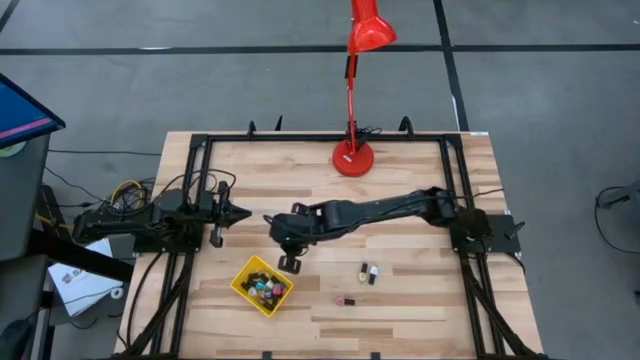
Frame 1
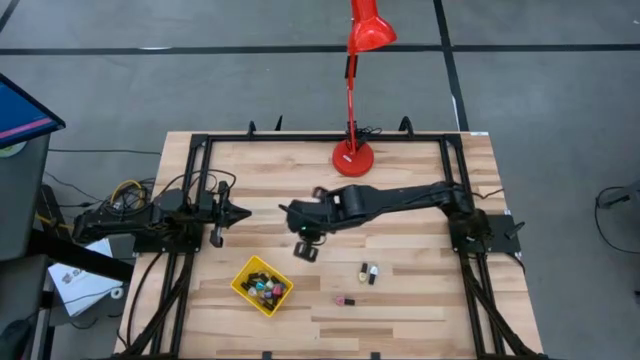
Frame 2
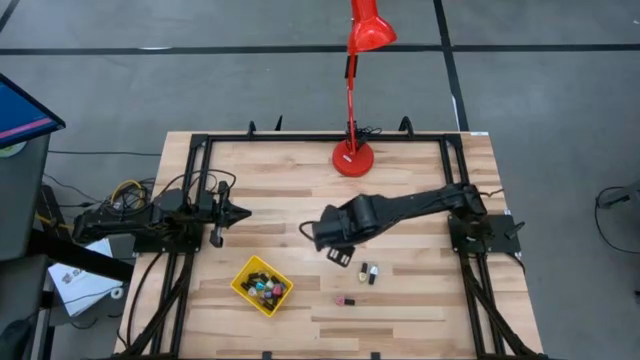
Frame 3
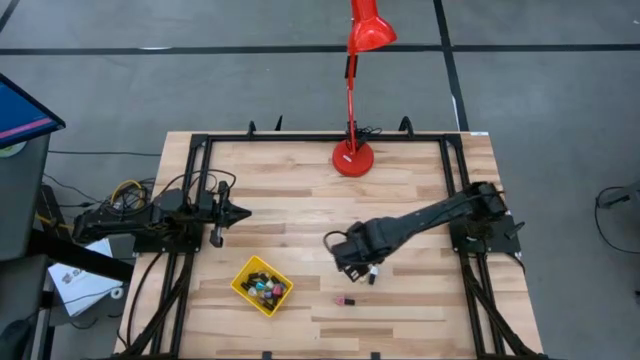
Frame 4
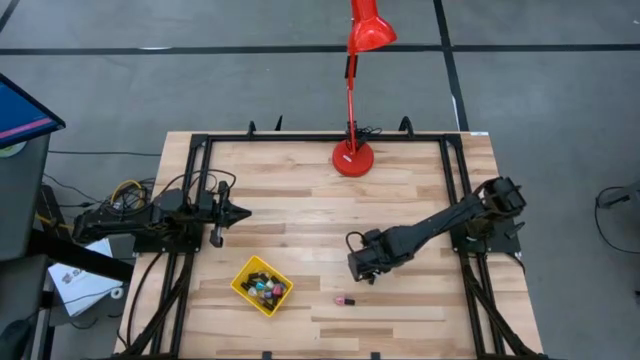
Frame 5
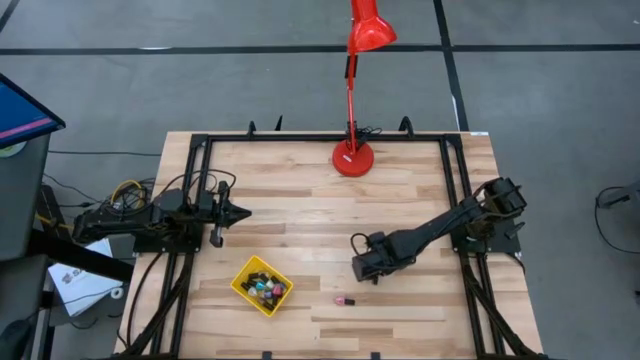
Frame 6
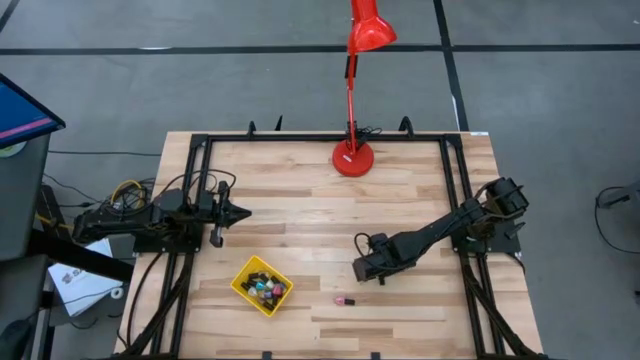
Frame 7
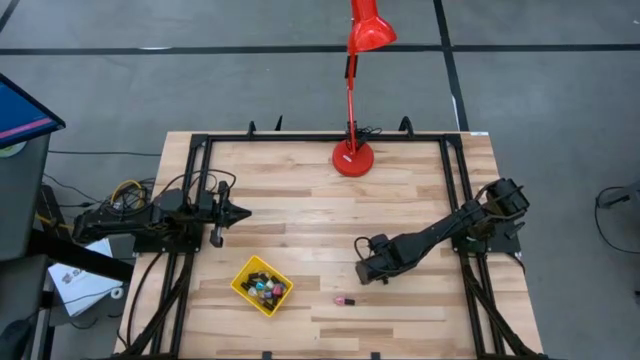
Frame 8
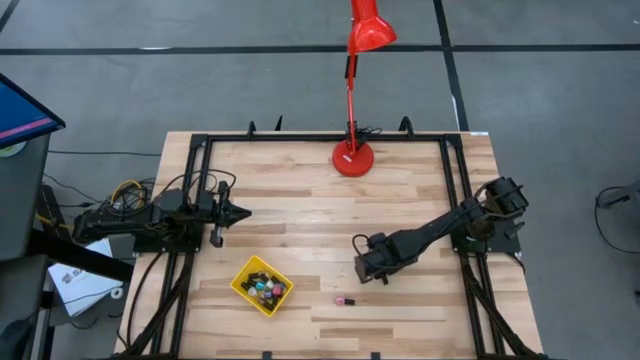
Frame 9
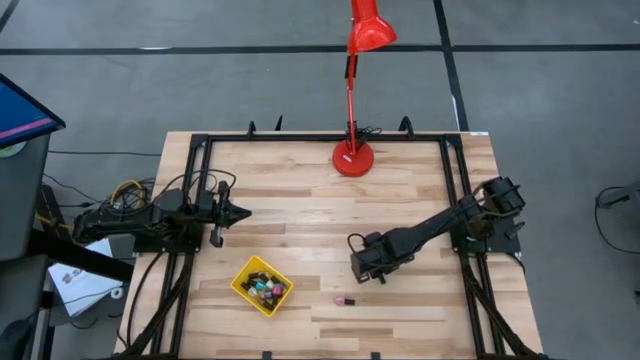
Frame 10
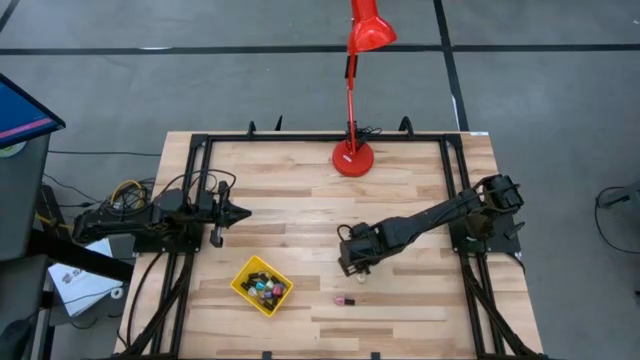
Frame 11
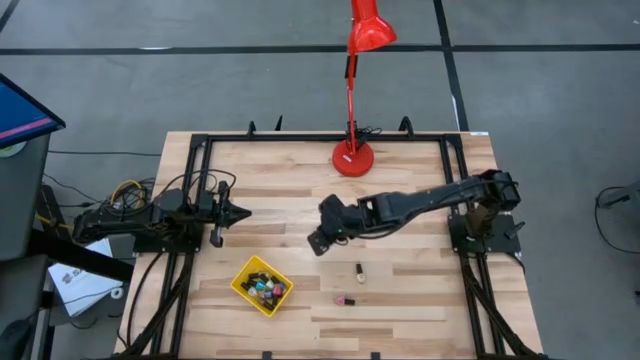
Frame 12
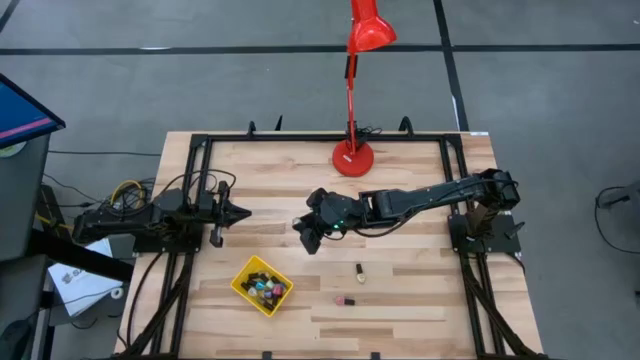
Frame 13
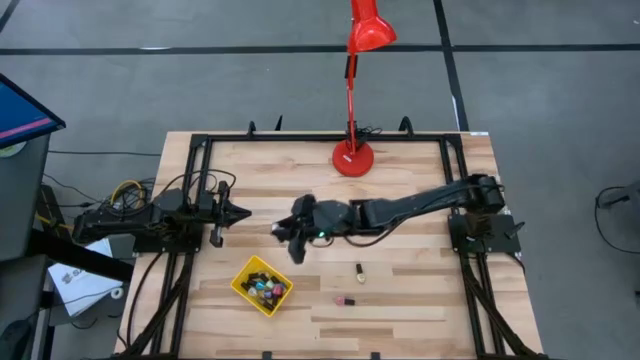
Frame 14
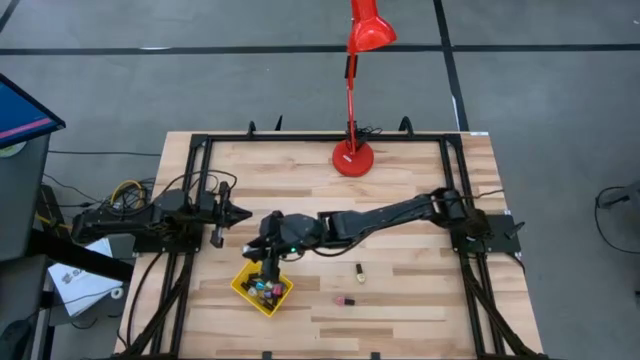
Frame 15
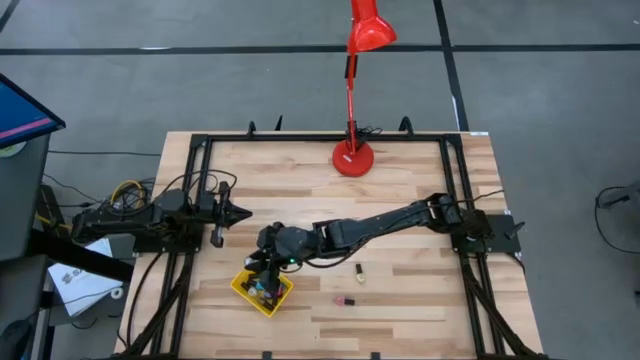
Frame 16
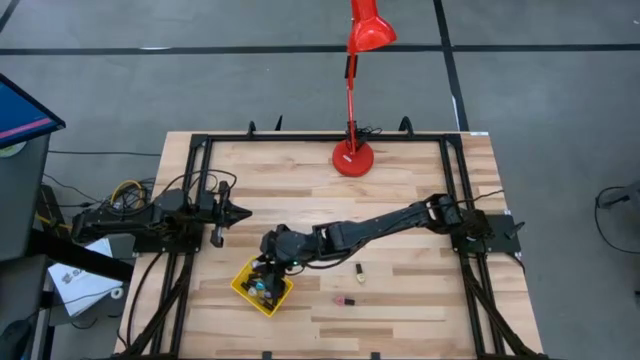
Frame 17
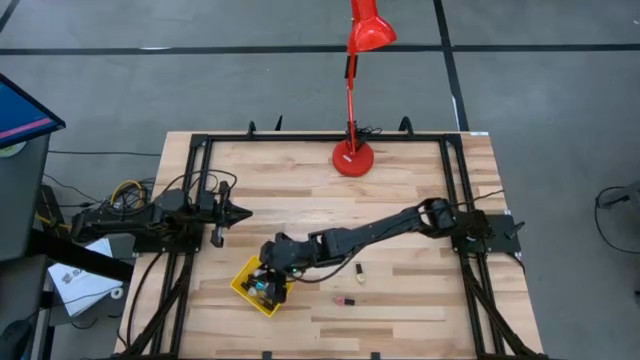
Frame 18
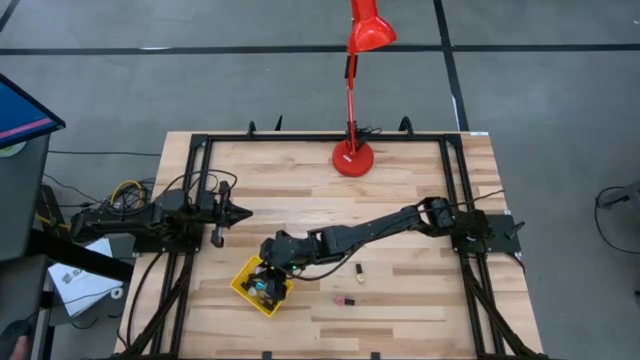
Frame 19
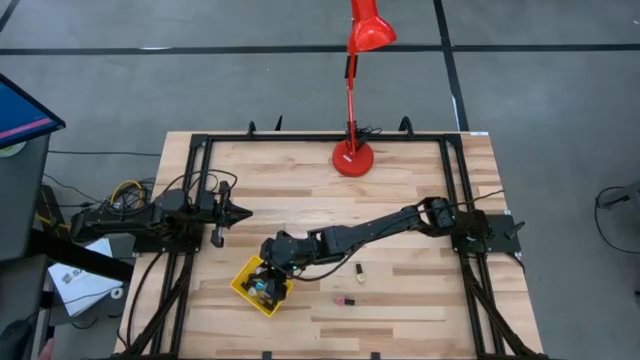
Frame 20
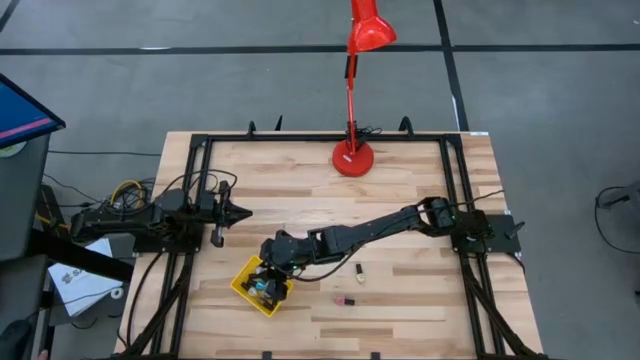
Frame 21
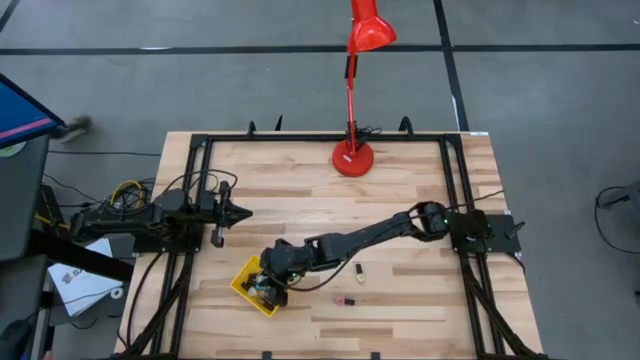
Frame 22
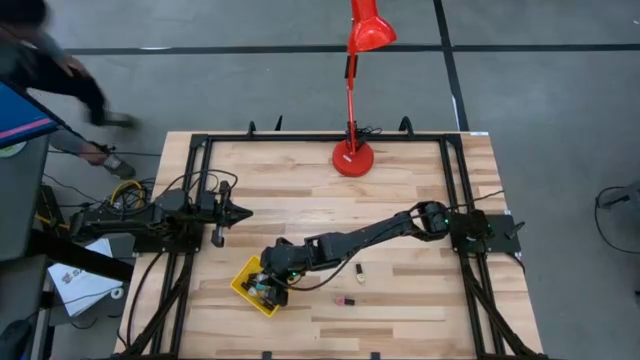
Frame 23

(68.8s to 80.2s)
Task: Pick & Place Nail Polish
Put the white nail polish bottle into the yellow basket

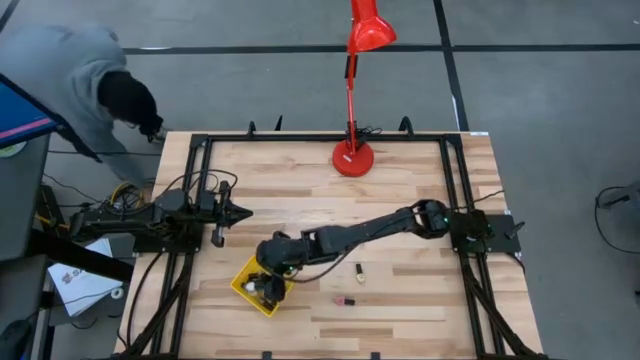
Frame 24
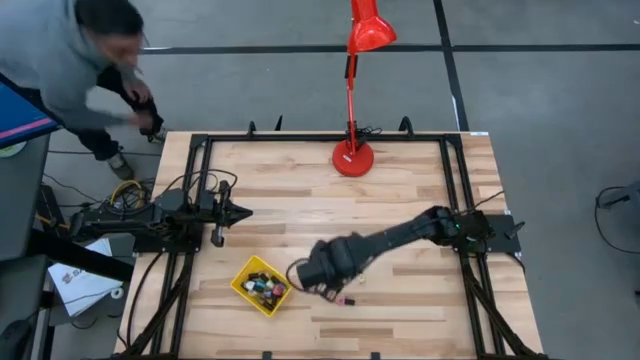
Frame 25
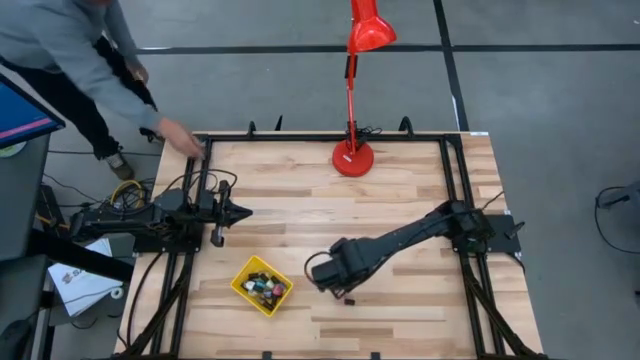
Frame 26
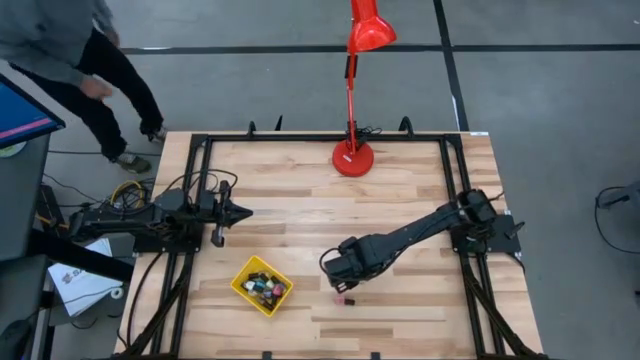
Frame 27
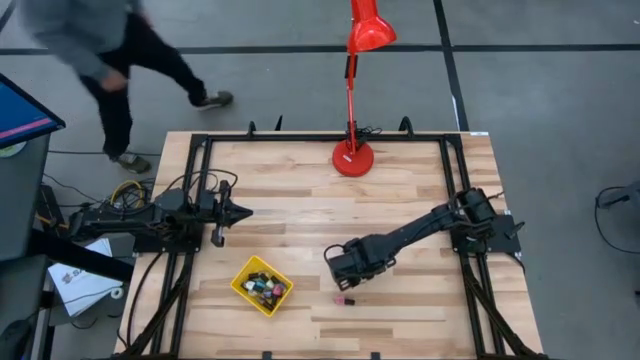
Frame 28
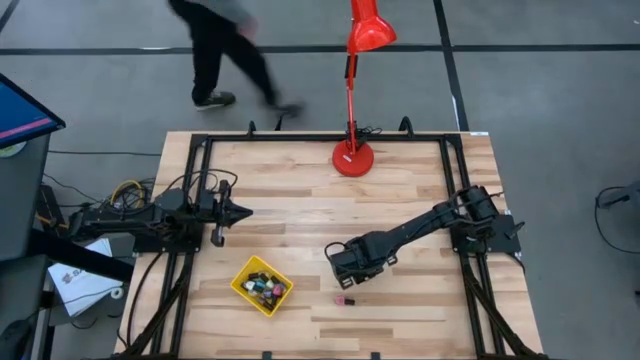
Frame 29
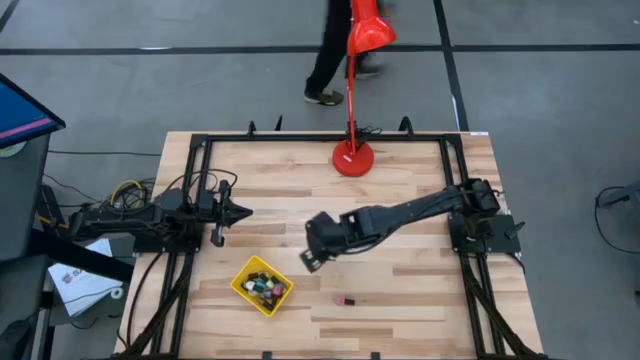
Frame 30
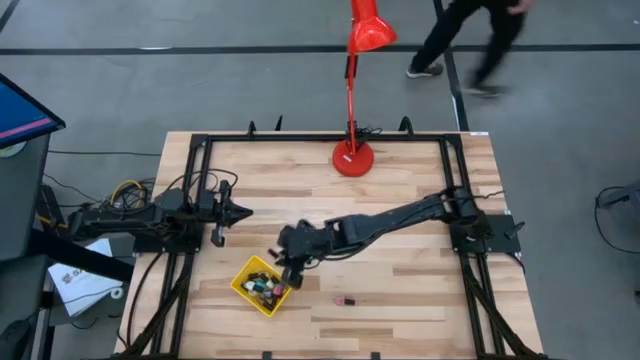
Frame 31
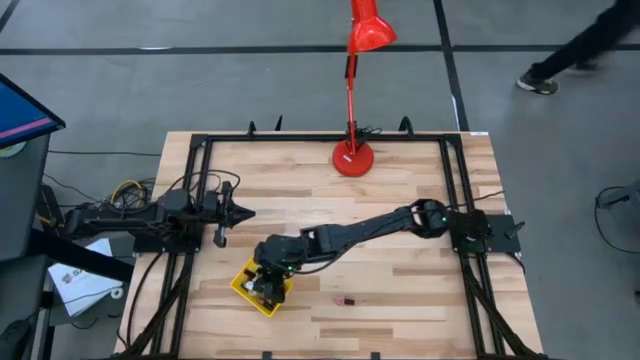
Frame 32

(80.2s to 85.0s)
Put the yellow nail polish bottle into the yellow basket

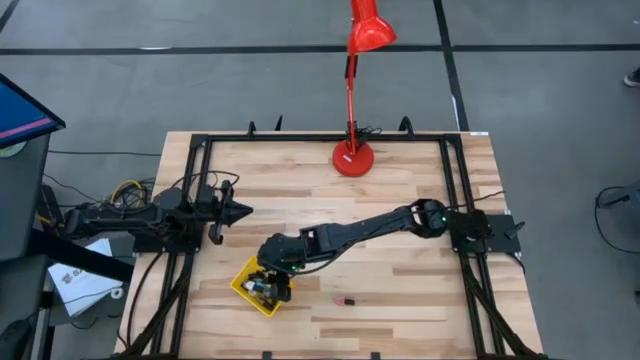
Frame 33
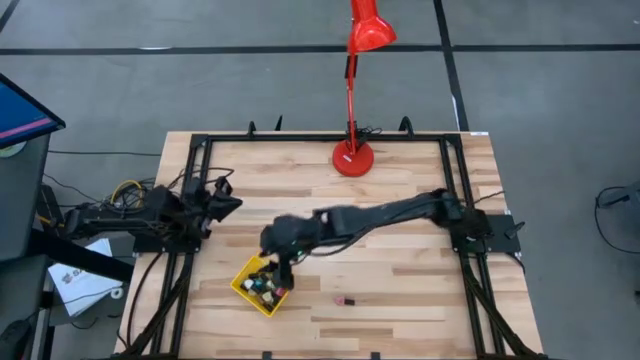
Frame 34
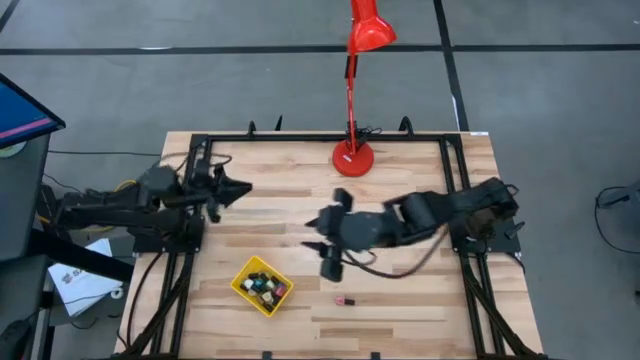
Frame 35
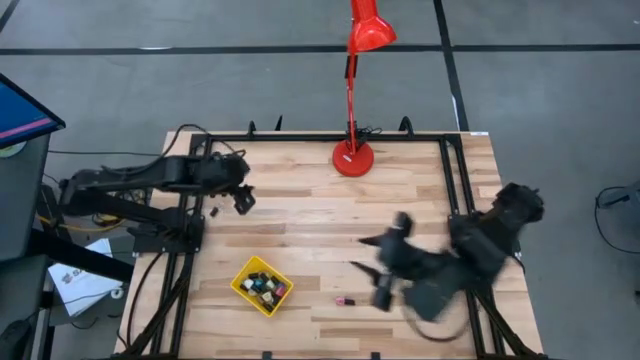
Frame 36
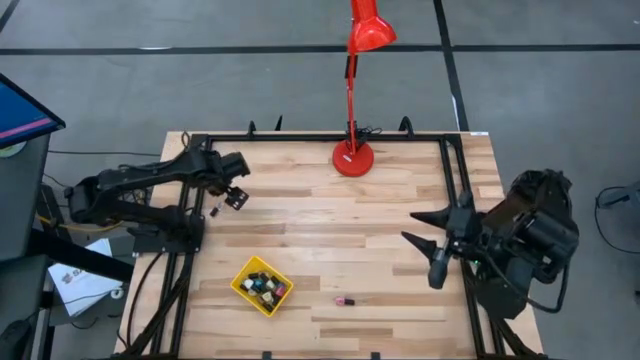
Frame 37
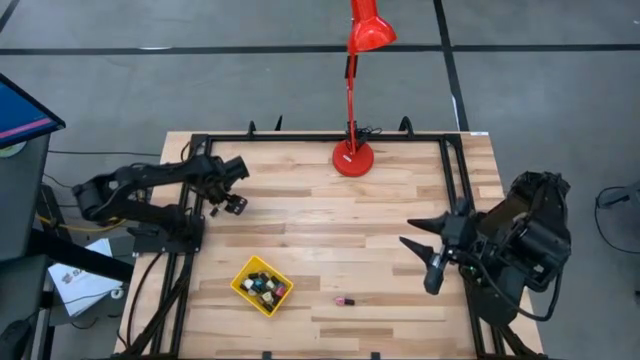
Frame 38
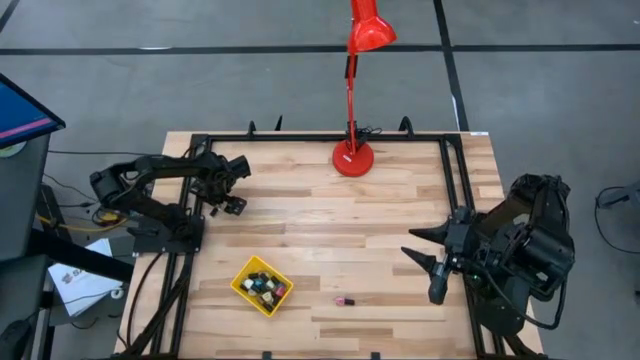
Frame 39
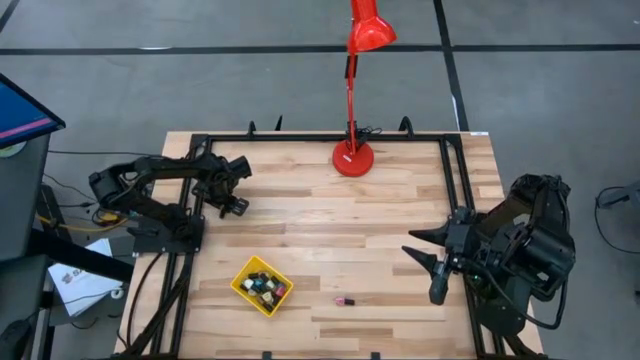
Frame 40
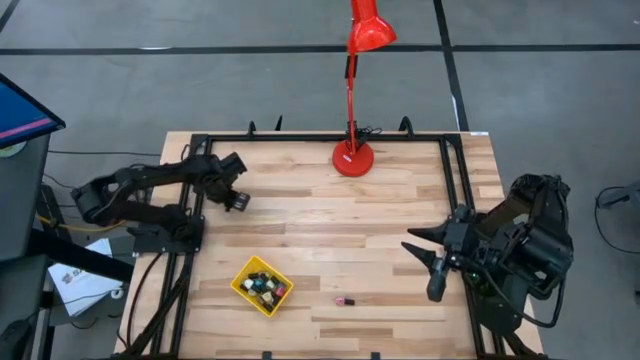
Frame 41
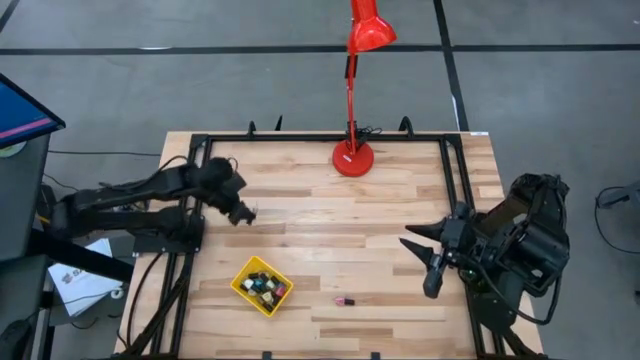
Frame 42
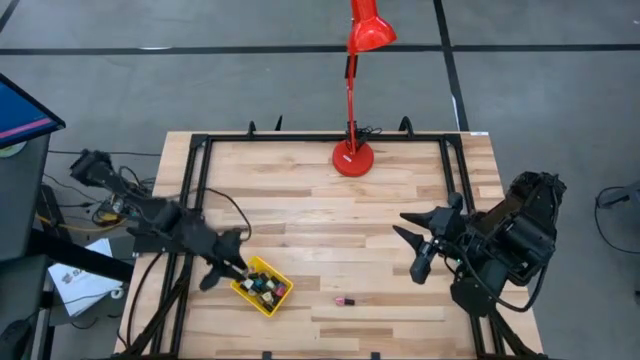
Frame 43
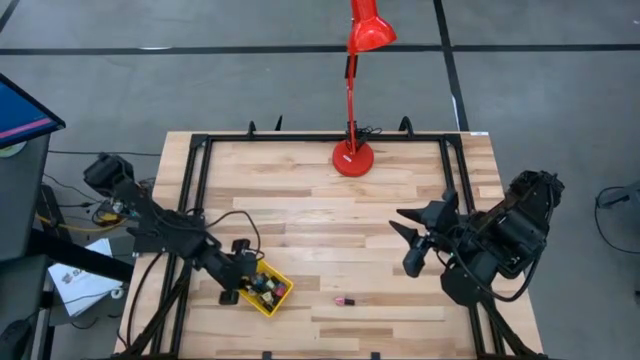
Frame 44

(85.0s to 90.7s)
Put the transparent nail polish bottle into the yellow basket
